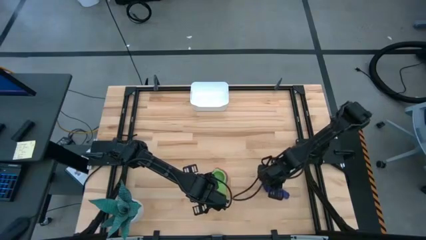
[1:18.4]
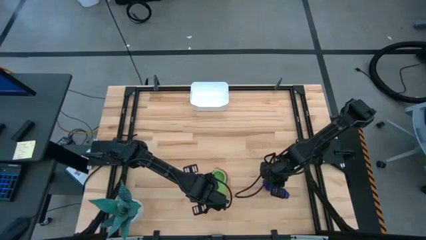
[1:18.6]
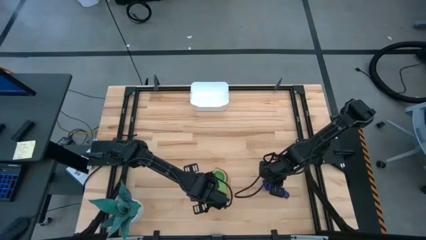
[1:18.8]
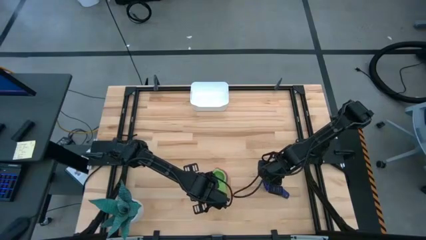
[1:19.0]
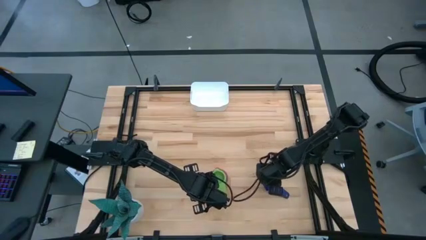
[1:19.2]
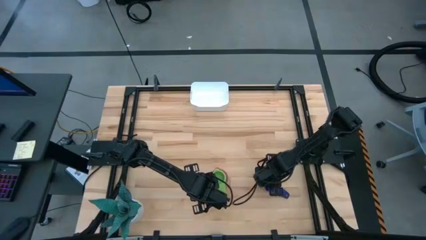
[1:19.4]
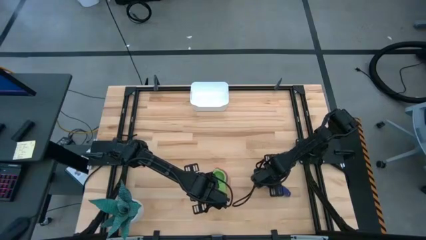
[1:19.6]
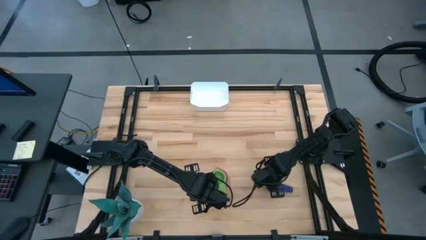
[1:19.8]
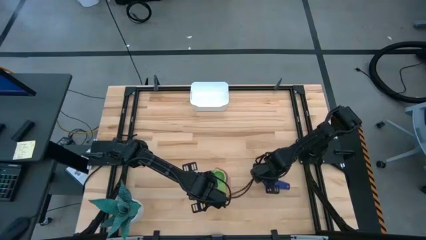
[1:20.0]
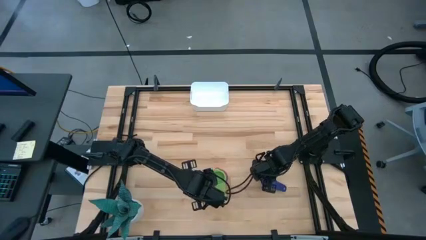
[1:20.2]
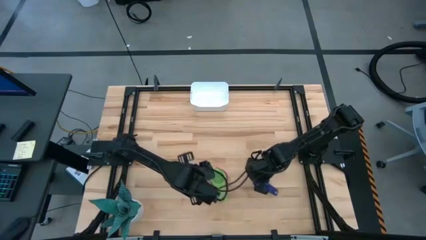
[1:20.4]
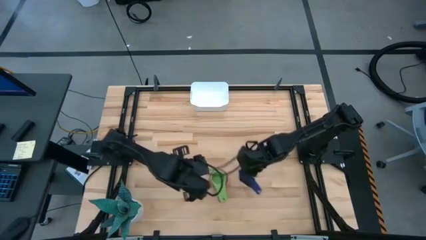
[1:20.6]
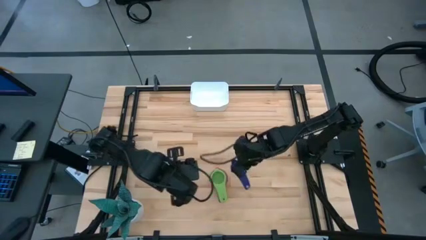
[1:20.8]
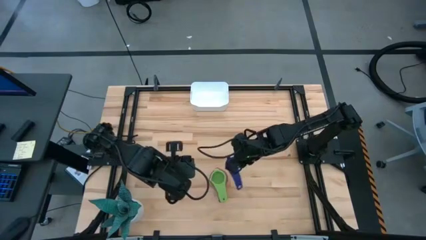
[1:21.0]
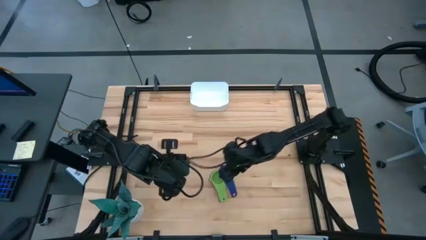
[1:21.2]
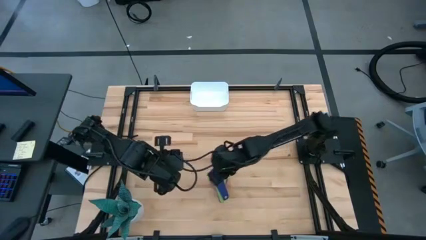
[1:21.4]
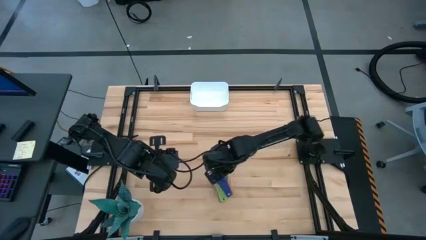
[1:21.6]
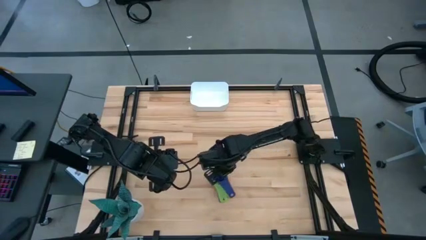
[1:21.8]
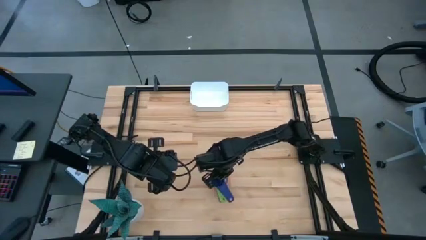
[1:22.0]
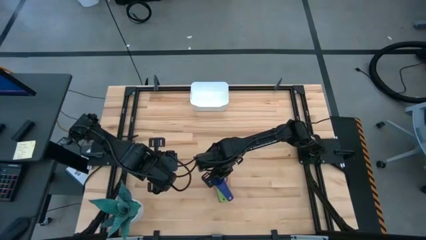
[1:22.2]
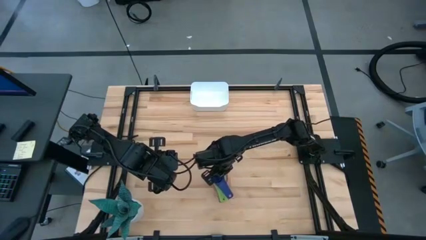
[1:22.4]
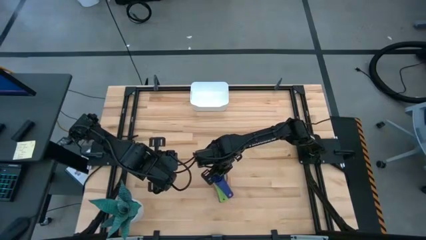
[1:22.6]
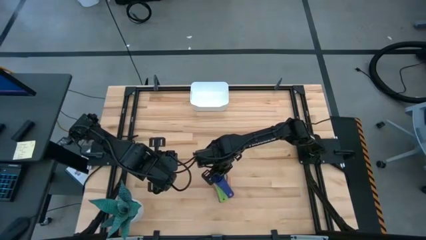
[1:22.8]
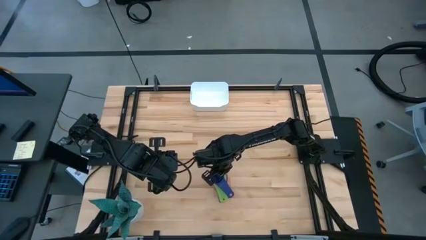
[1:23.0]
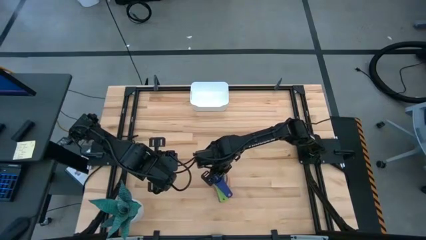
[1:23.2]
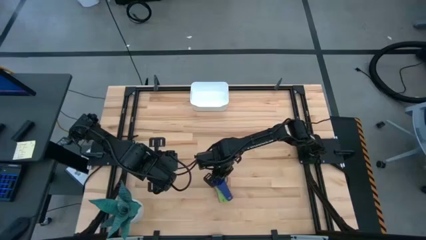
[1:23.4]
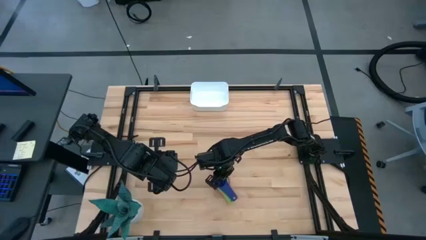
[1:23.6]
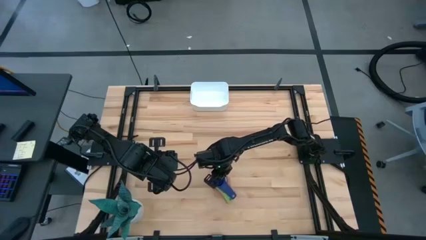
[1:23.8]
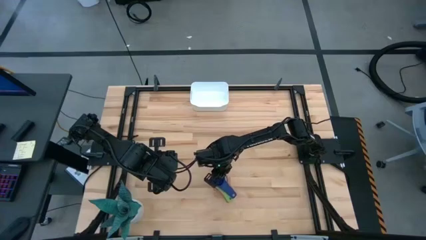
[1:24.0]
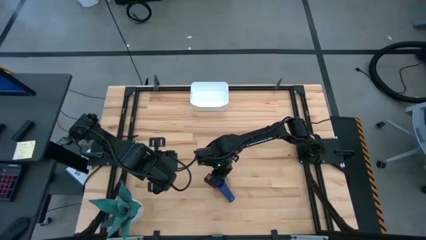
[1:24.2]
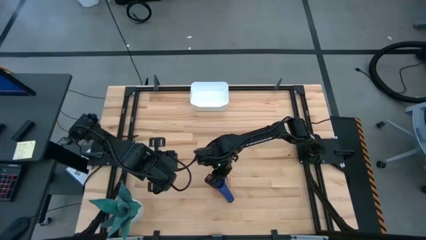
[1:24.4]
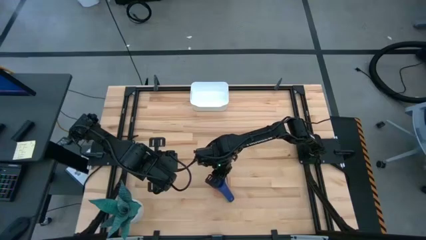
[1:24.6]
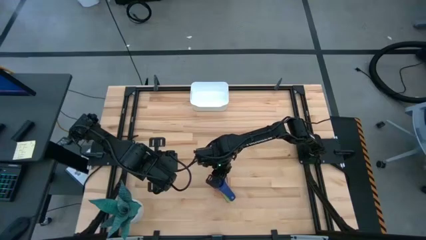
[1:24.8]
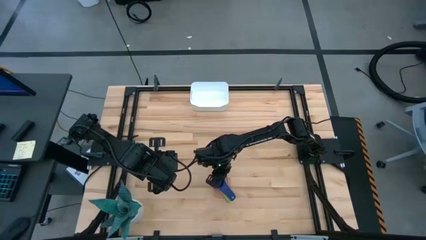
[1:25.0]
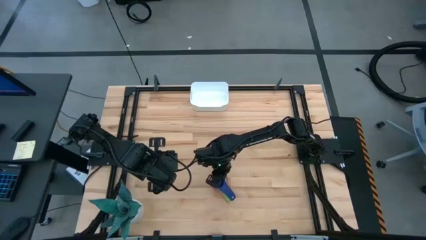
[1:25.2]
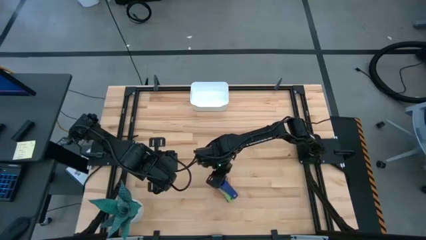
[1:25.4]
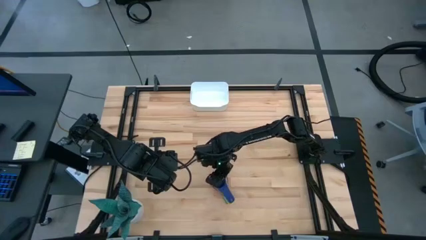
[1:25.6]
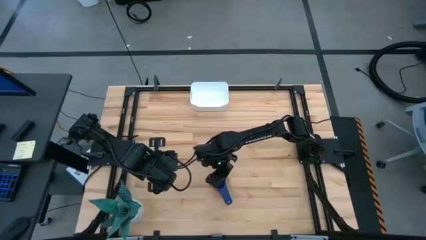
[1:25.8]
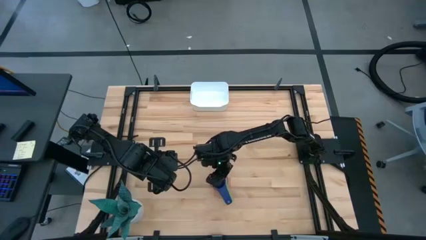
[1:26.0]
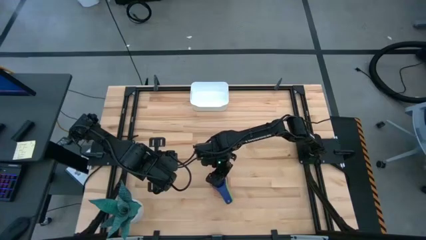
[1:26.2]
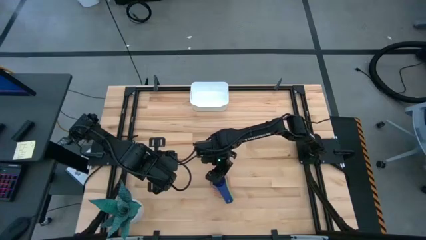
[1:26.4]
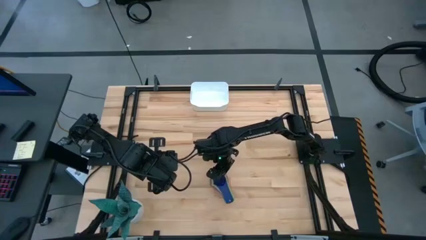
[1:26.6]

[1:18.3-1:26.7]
Task: Nest measuring cups in basket
Stack the dark blue measuring cup on top of the green measuring cup

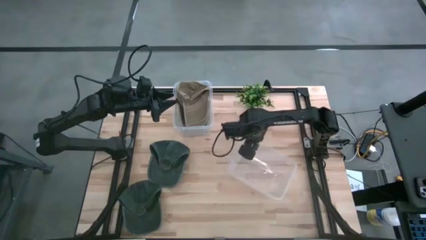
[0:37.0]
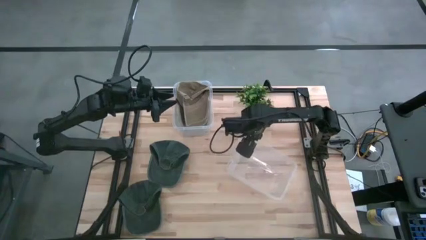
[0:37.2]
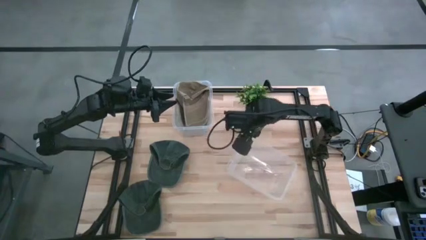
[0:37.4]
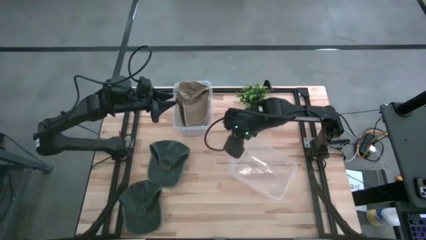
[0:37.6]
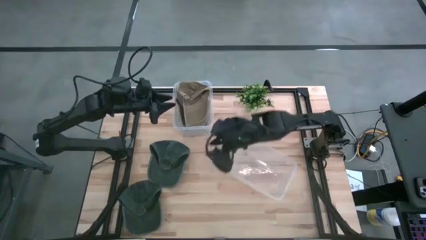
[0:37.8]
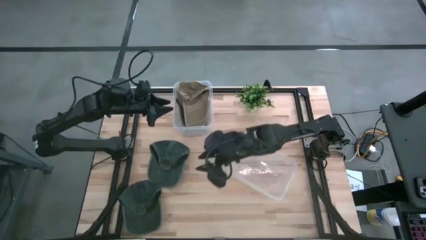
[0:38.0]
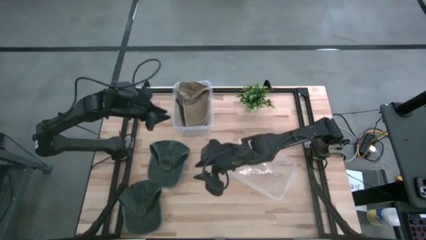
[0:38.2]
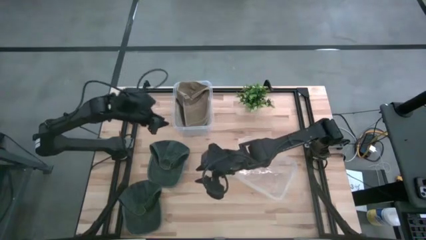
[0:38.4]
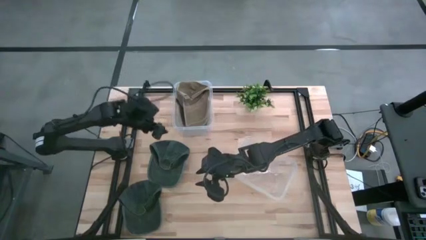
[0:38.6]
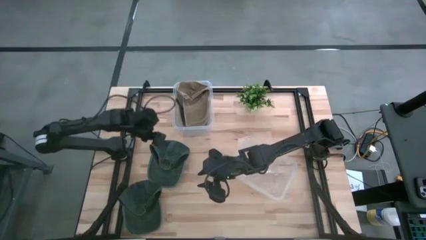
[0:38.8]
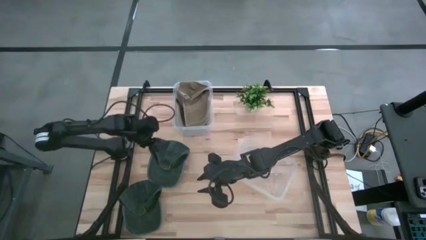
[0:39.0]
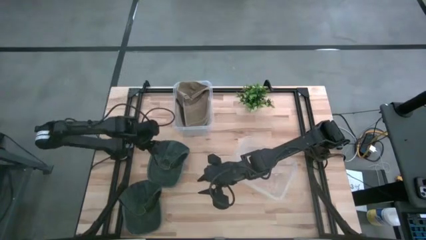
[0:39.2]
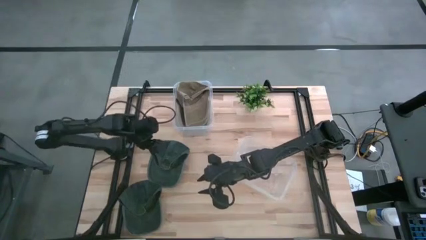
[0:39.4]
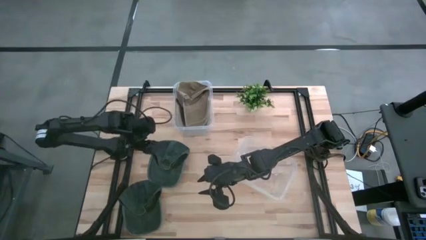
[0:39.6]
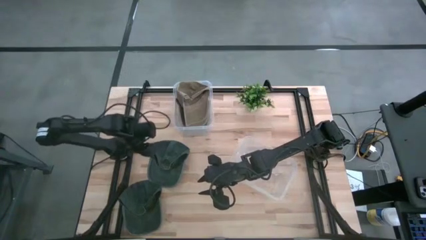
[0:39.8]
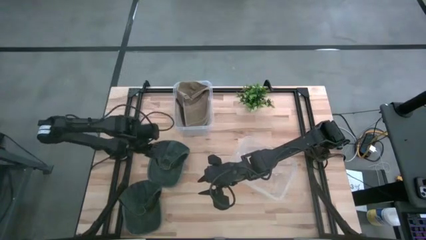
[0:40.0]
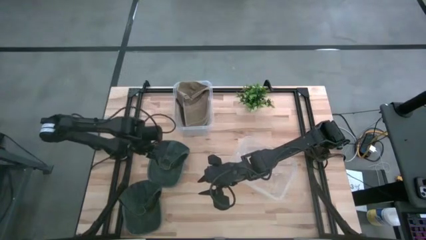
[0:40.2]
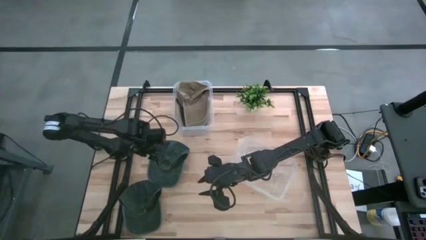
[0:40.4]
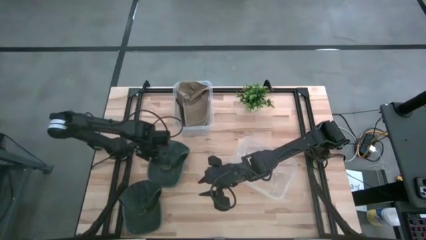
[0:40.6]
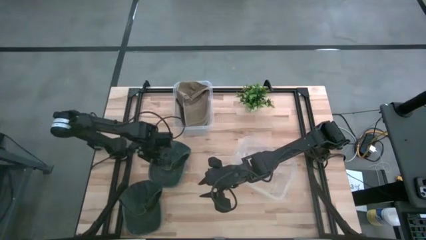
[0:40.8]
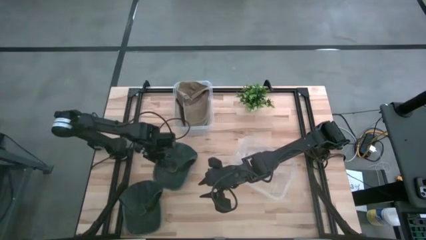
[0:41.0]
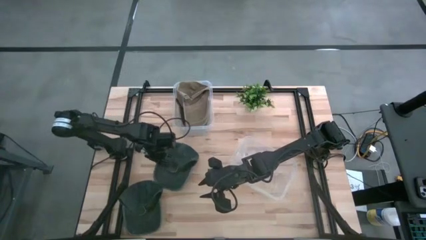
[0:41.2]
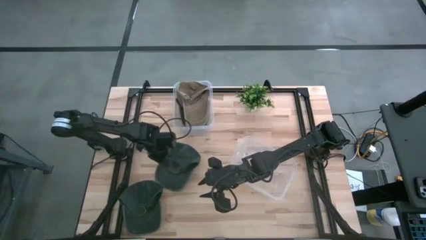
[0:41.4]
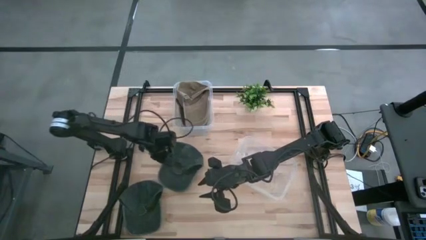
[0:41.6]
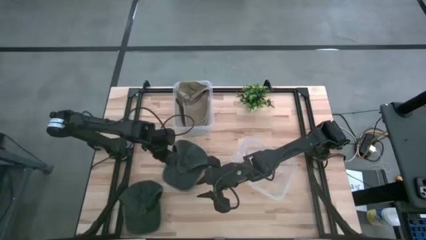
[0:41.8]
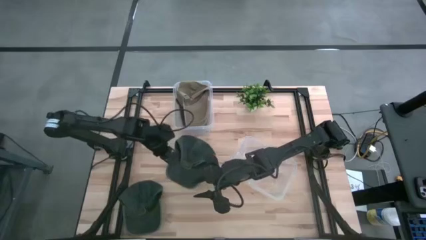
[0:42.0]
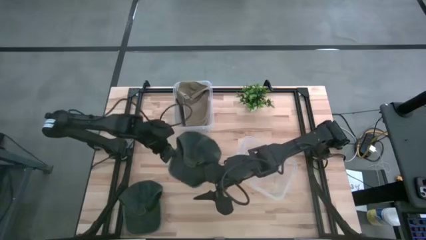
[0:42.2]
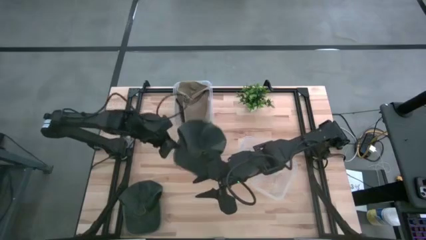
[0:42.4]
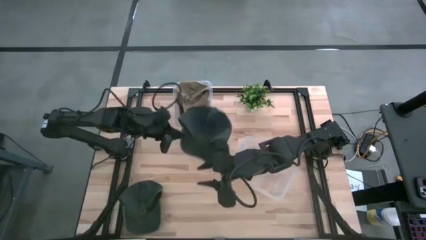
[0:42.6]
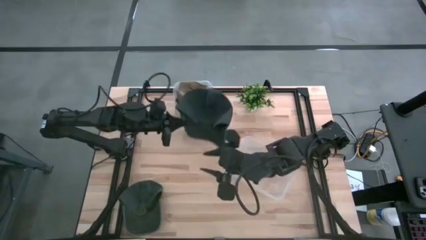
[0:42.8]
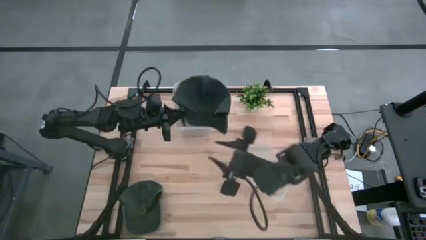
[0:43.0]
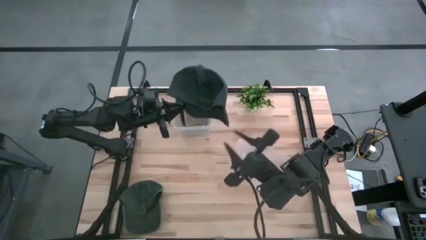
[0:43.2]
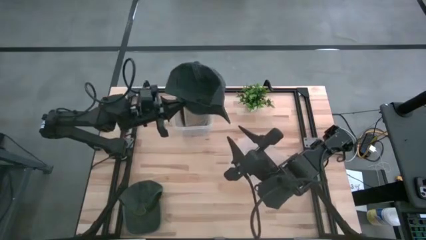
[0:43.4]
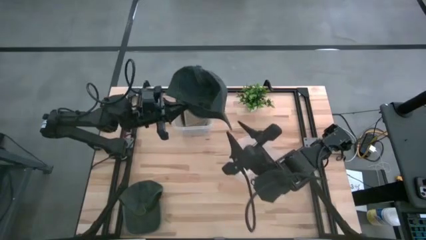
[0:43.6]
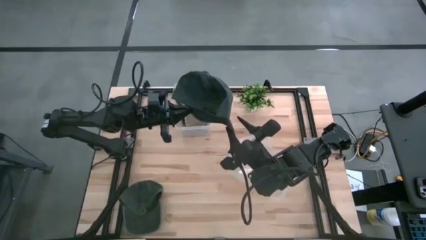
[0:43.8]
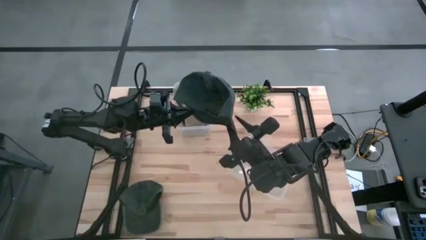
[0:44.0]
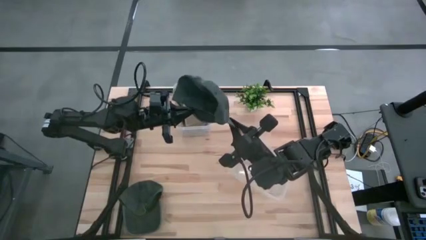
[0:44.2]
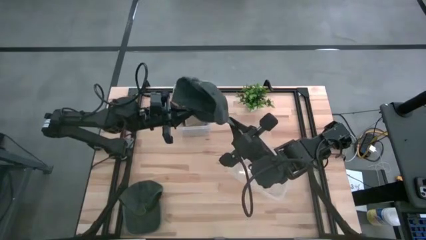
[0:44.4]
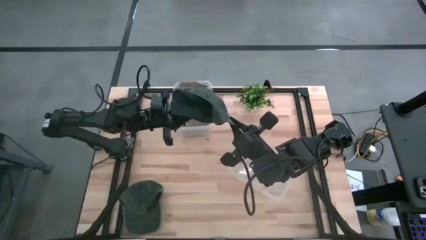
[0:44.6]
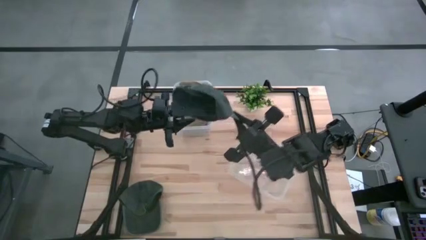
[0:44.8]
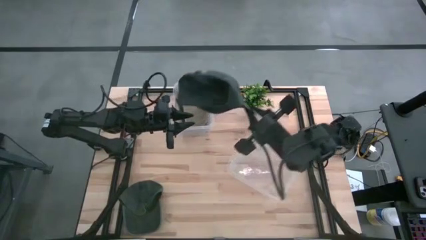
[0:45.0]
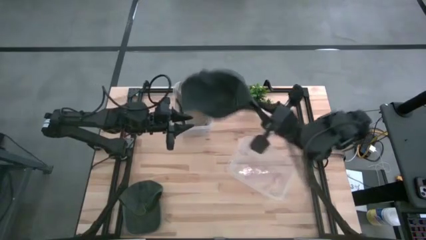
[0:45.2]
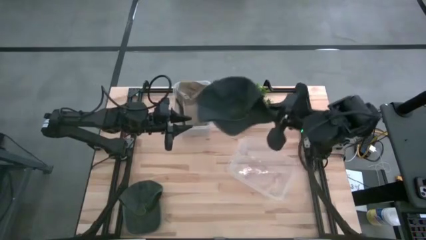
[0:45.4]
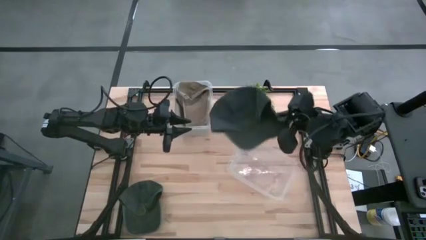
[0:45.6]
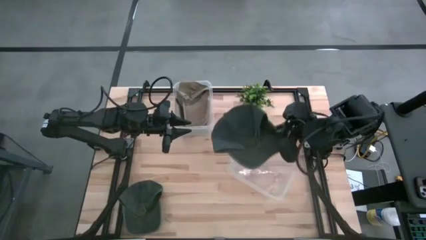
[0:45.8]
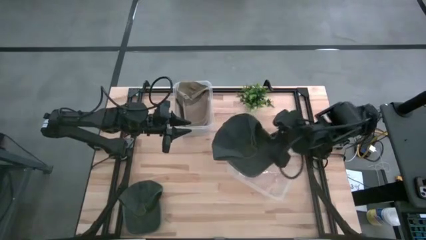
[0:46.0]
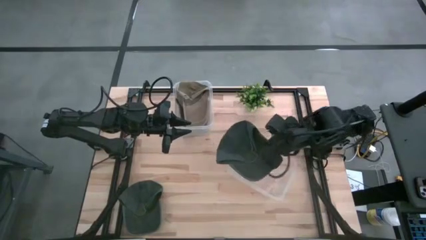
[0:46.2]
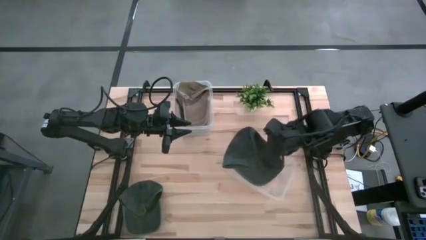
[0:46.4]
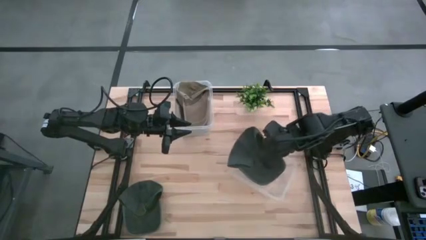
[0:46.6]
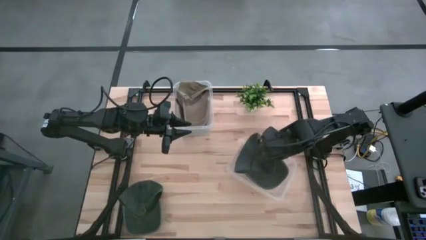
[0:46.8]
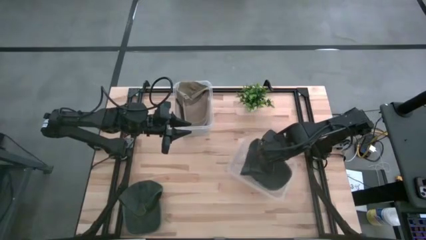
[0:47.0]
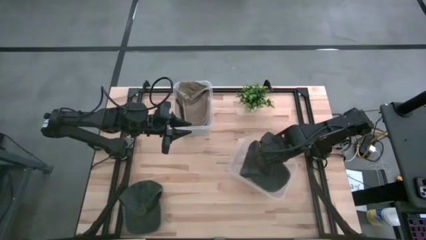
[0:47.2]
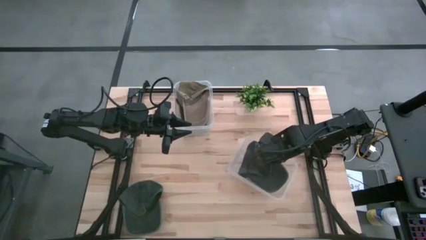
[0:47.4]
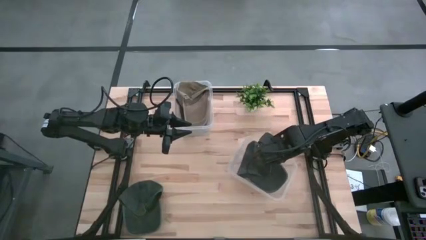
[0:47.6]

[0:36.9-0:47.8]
Task: Pick & Place hat
Put the top black cap into the bottom transparent bin
